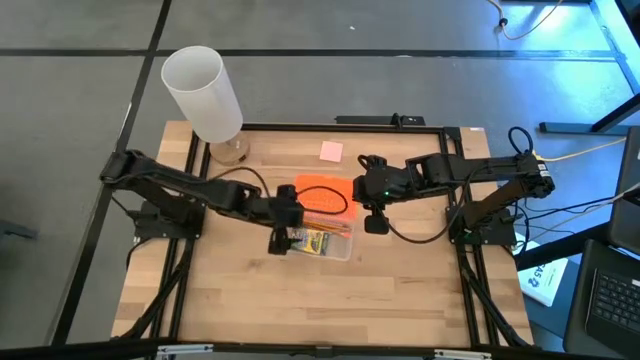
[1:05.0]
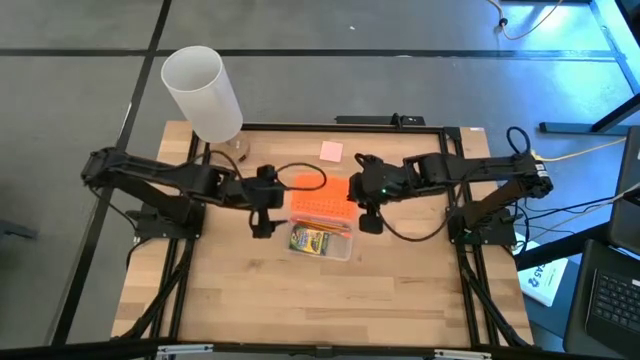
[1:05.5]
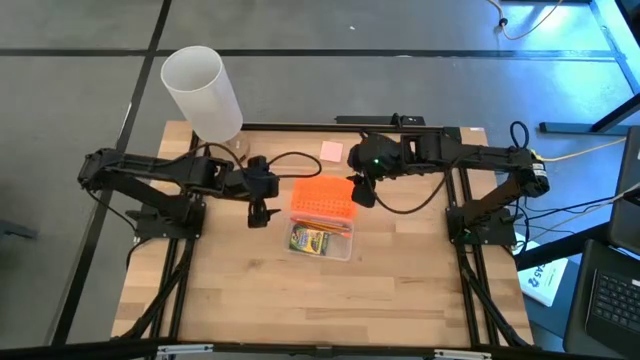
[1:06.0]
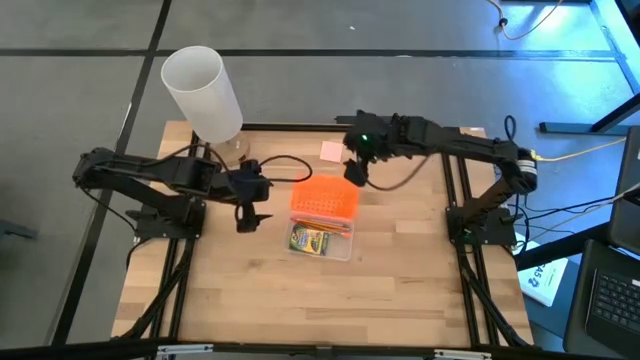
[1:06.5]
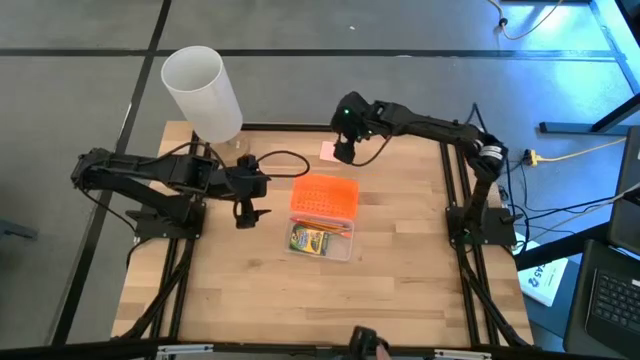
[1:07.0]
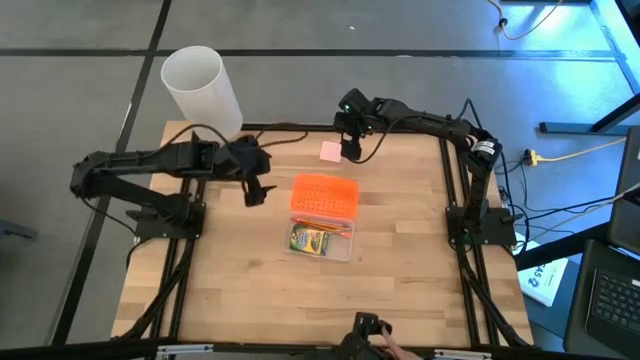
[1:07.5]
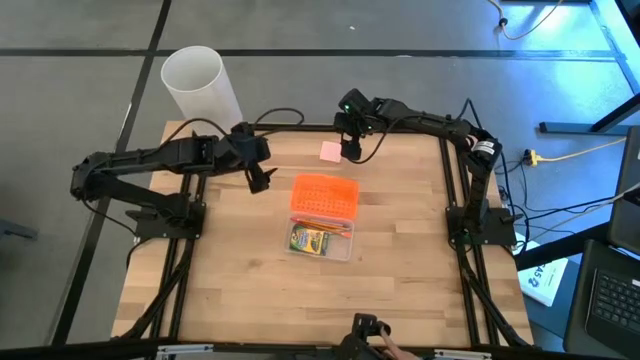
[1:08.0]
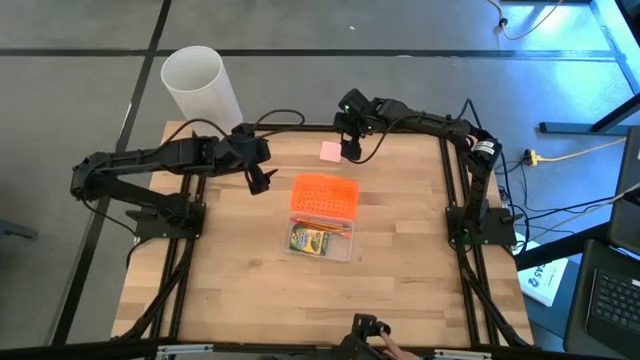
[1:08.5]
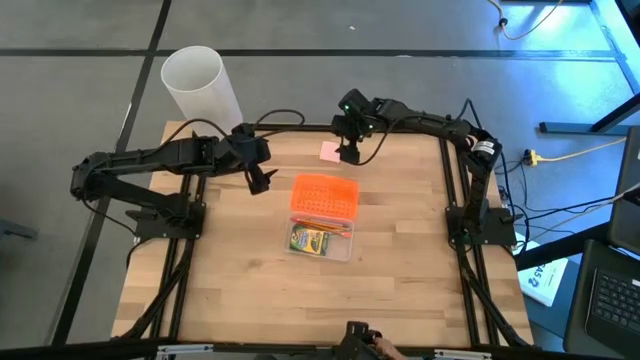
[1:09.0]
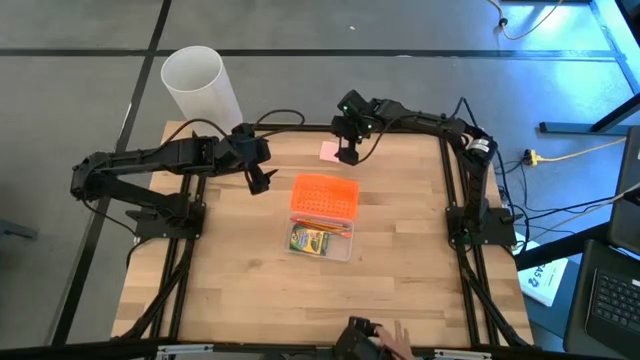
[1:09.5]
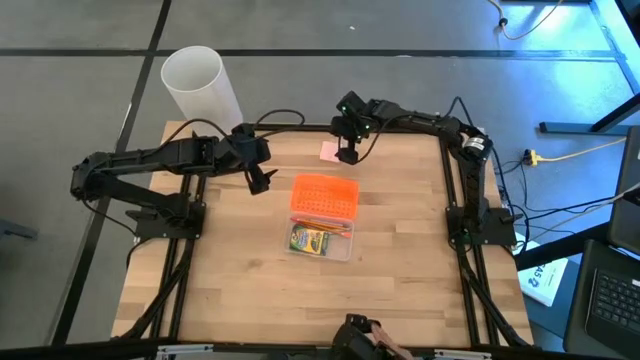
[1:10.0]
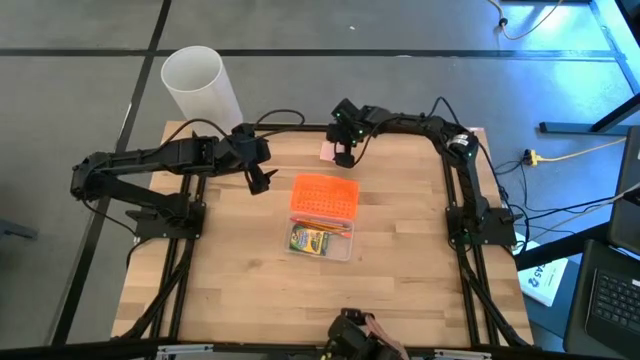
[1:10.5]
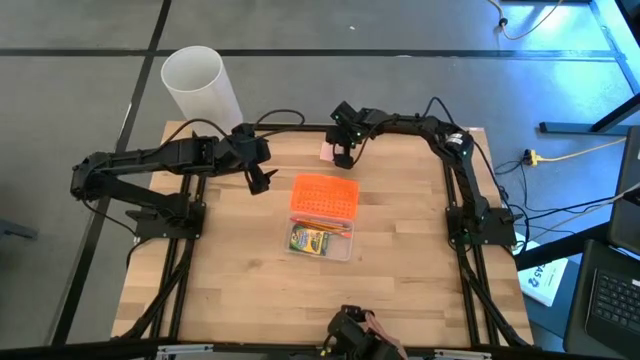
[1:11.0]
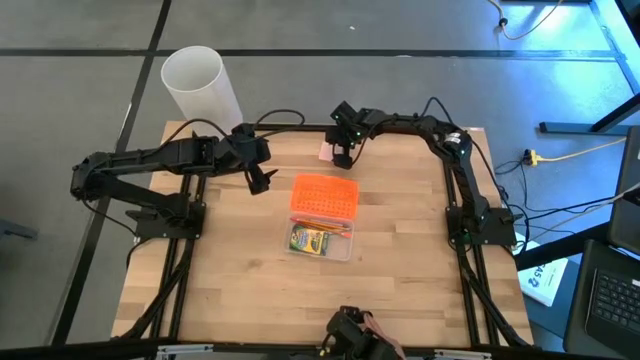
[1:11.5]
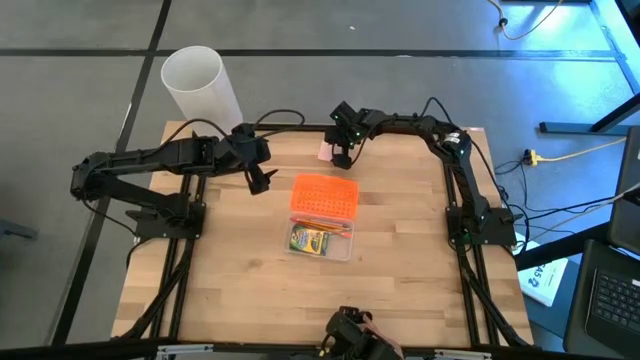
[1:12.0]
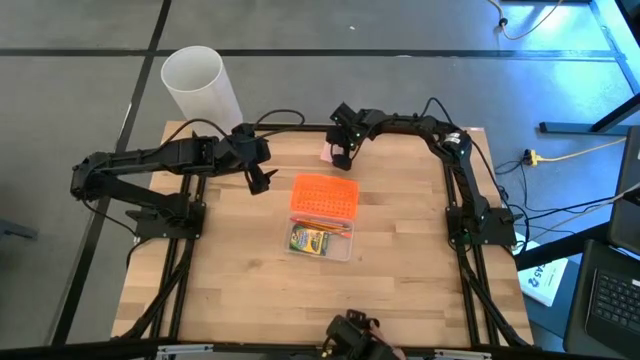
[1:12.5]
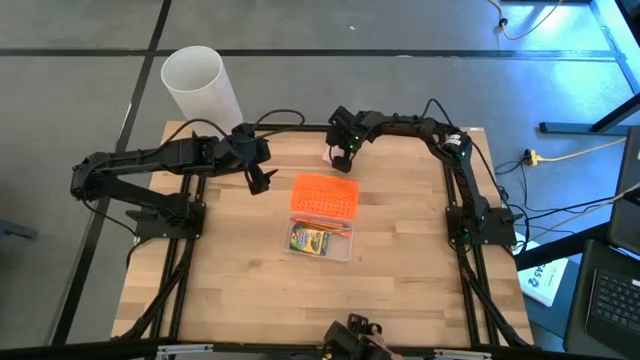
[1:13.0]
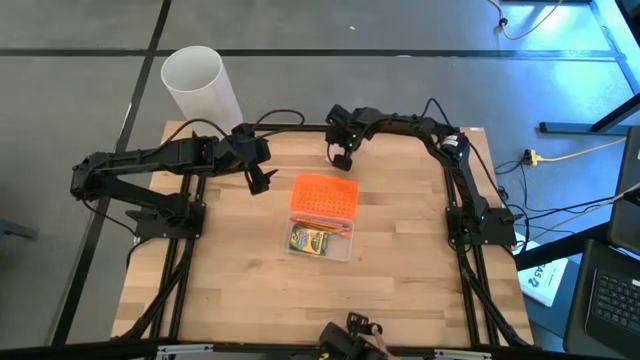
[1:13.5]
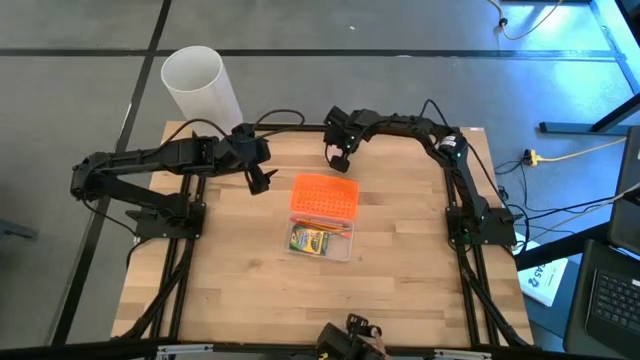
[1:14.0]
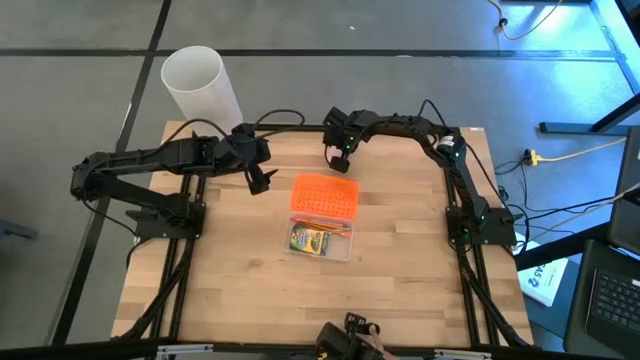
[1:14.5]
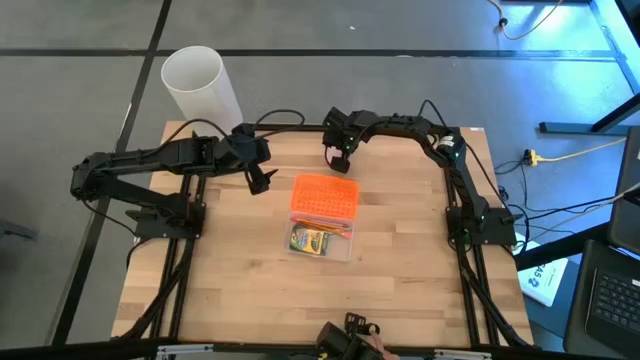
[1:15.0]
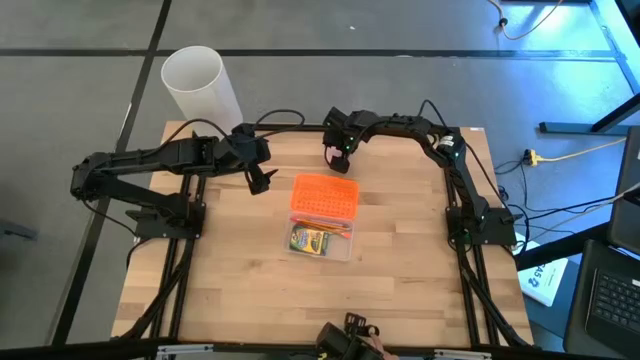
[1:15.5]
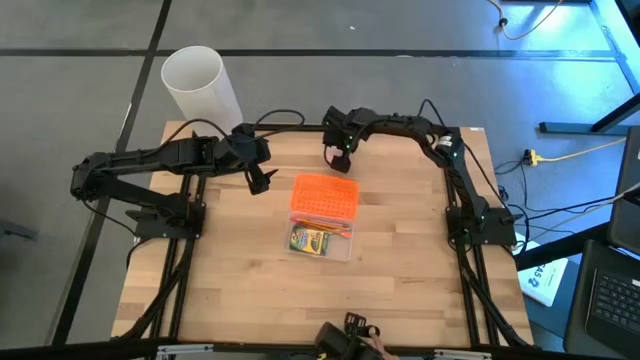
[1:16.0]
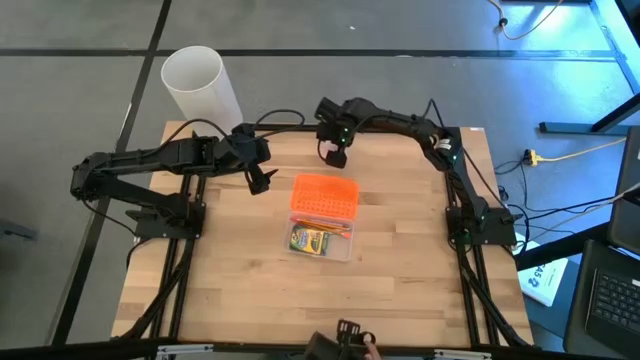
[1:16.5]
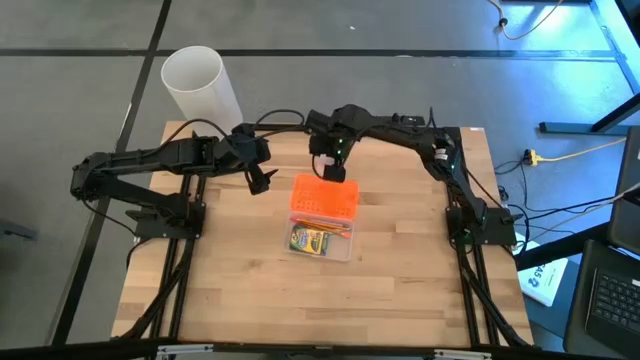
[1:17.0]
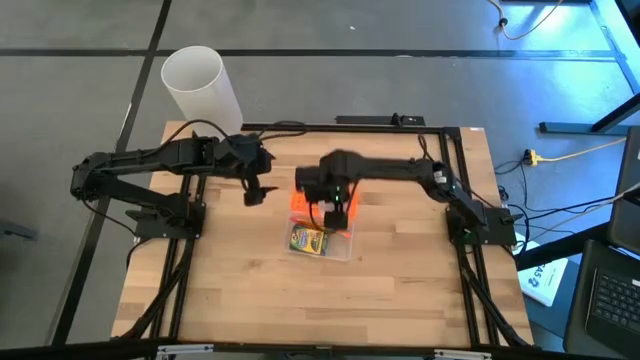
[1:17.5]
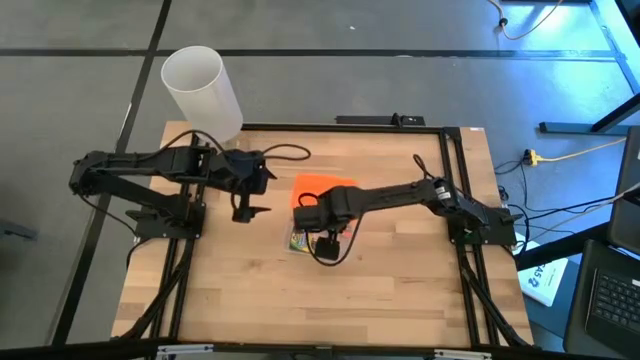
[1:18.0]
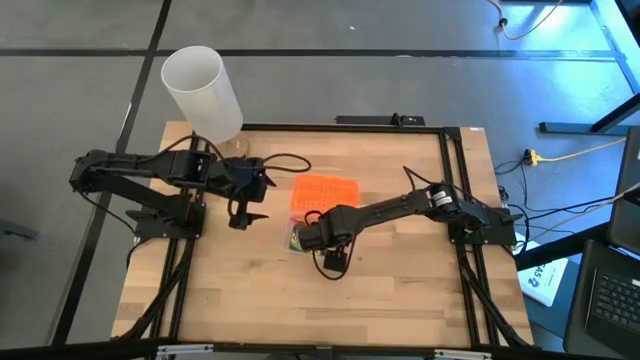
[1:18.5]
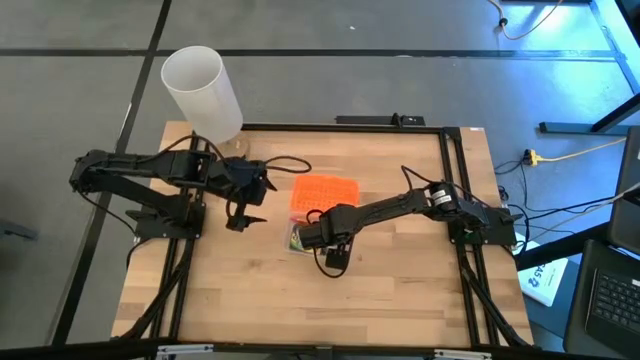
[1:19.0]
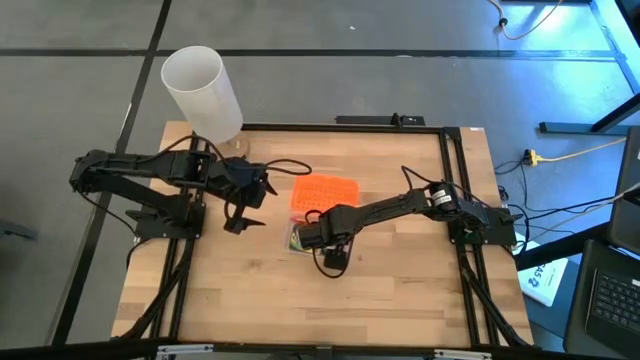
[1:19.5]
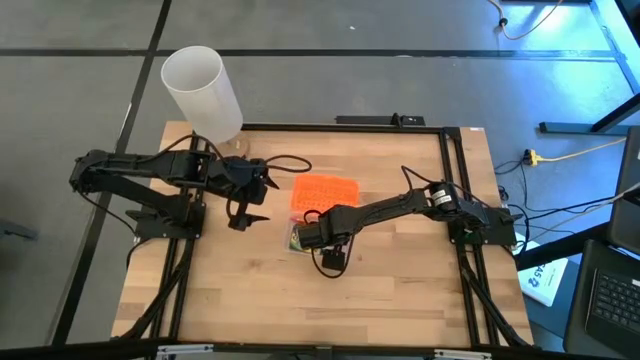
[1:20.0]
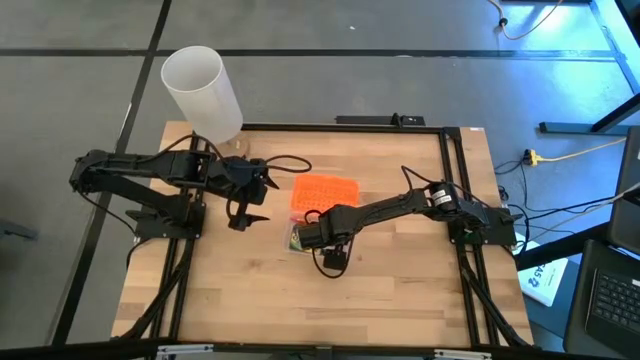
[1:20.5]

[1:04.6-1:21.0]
Task: Pack school essentials
Put the pink sticky notes into the orange supply box

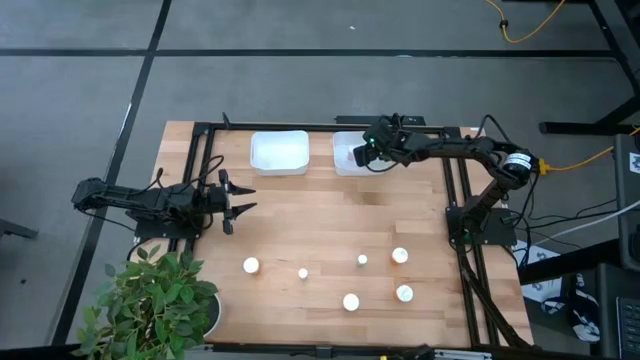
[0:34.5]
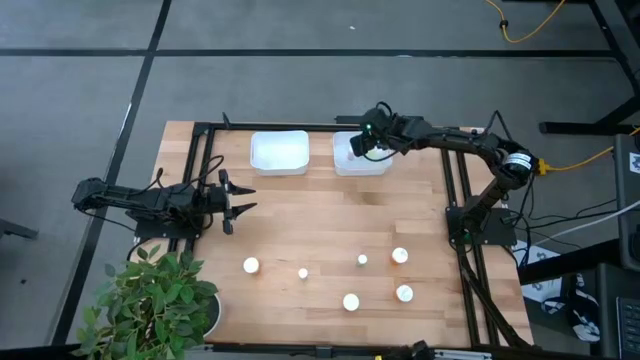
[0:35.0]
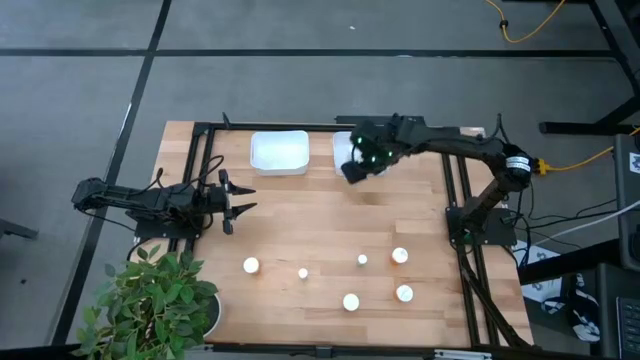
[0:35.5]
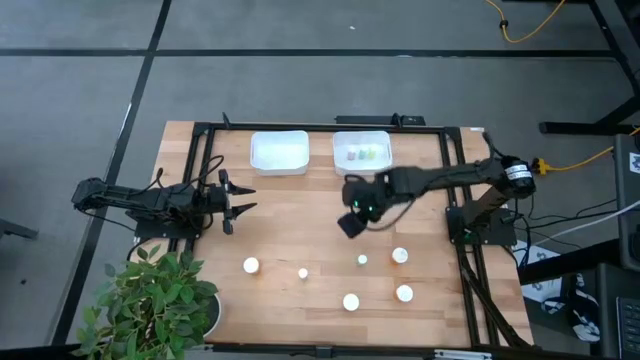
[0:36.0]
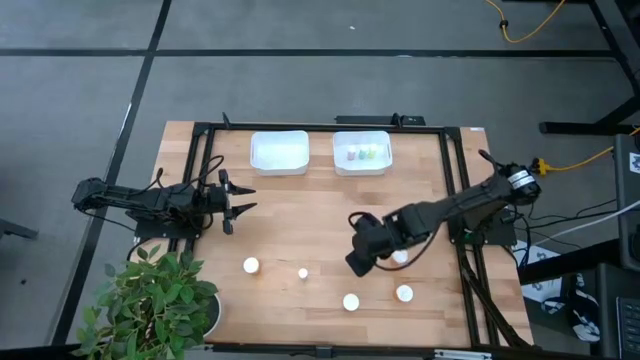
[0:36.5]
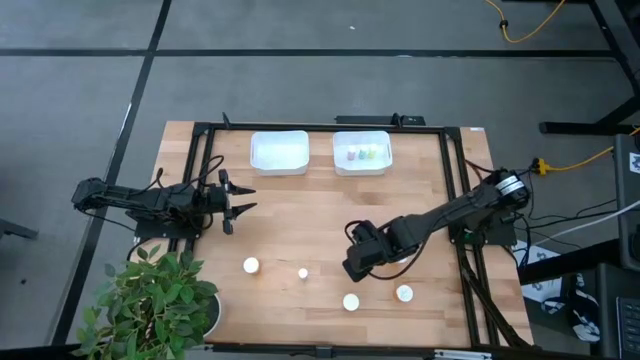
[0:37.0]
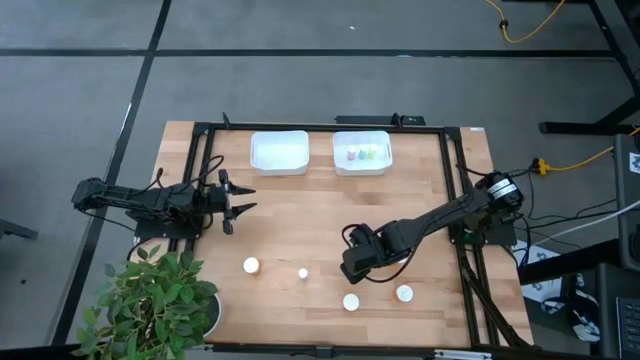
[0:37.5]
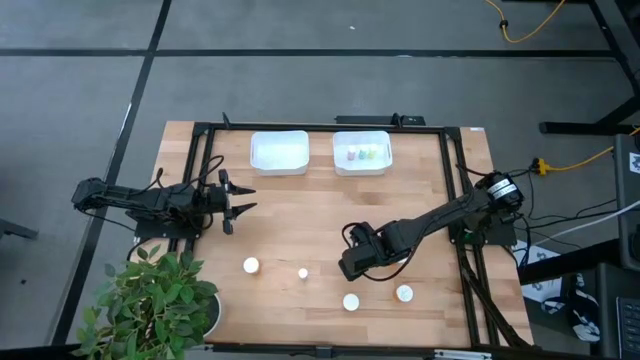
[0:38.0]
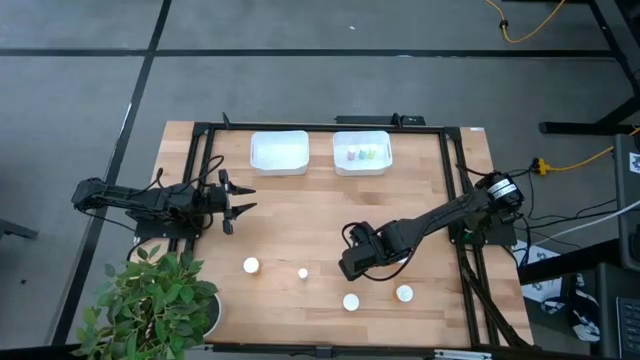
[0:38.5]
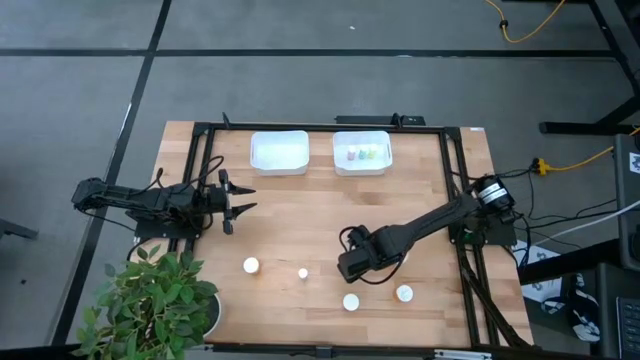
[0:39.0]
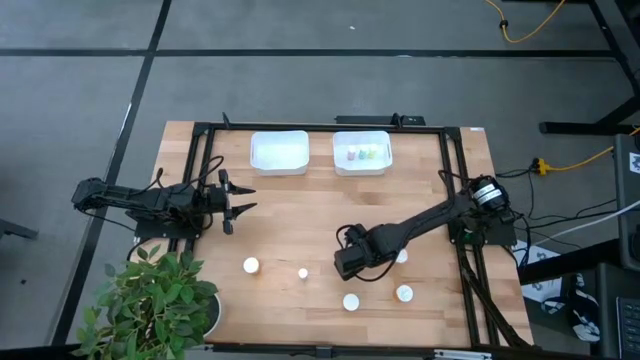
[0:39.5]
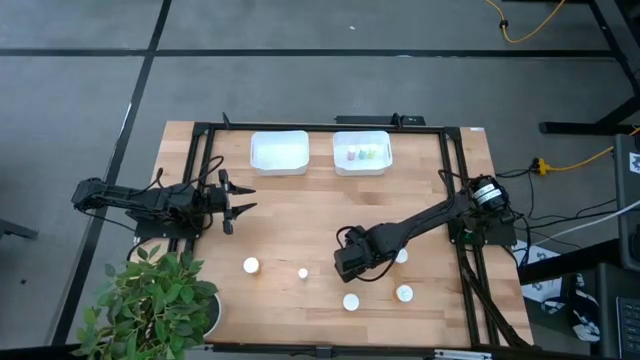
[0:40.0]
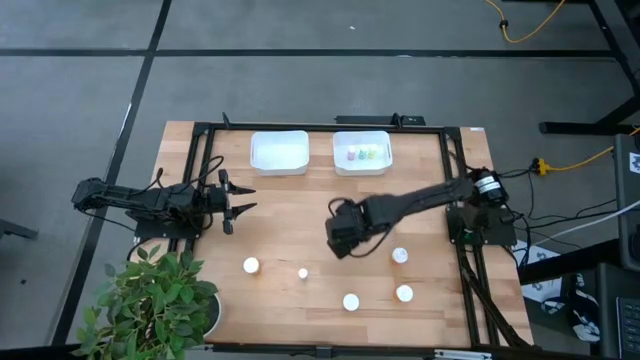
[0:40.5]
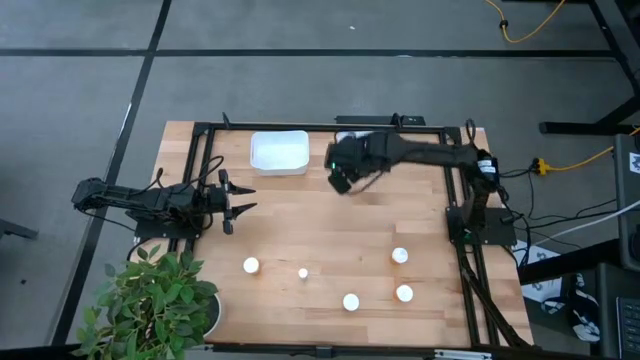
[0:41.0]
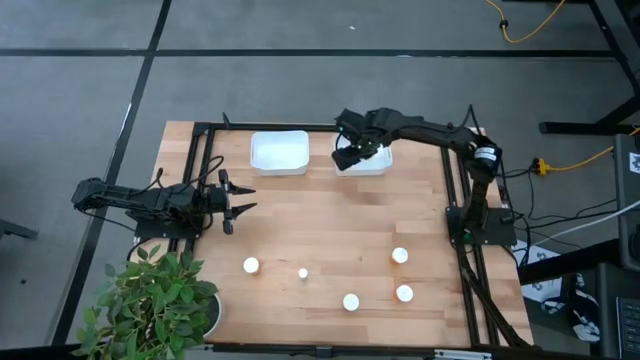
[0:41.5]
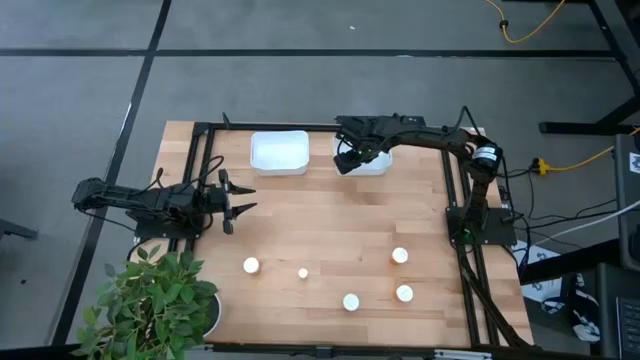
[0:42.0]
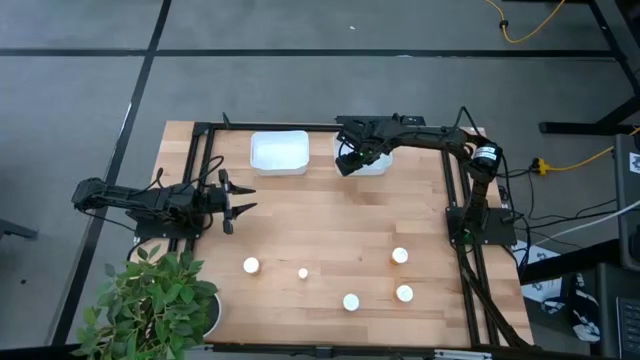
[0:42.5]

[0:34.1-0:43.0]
Task: Pick and place medicine bottles into bin by pill shape (circle, oval)
Put the blue pill bottle into the right white bin
